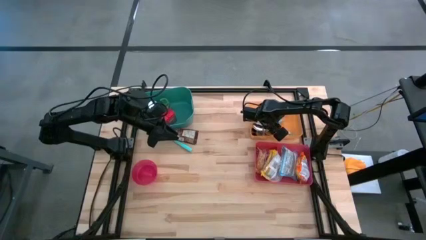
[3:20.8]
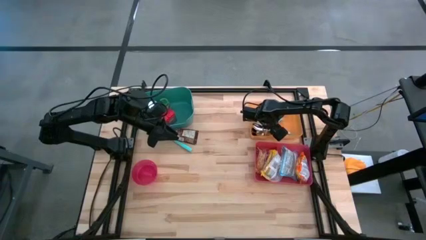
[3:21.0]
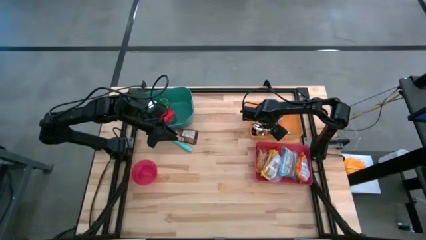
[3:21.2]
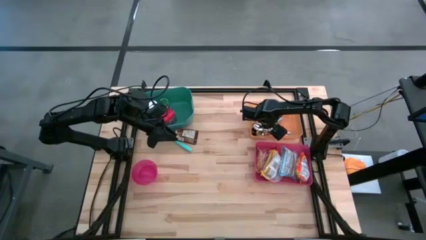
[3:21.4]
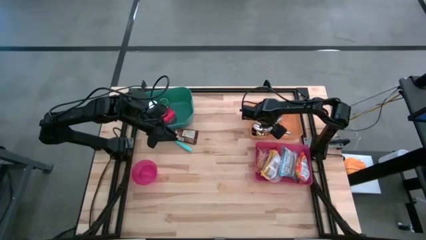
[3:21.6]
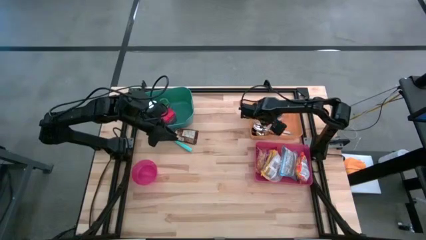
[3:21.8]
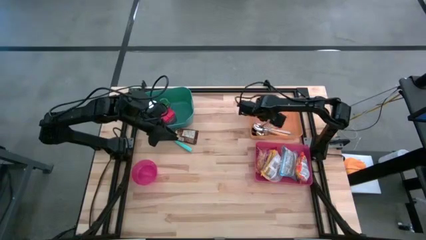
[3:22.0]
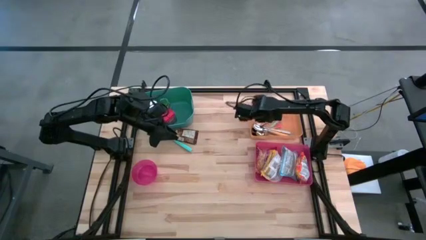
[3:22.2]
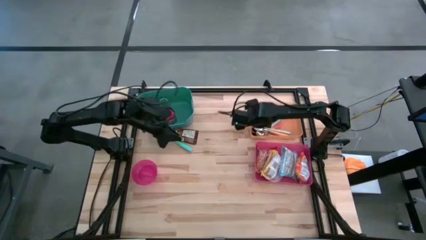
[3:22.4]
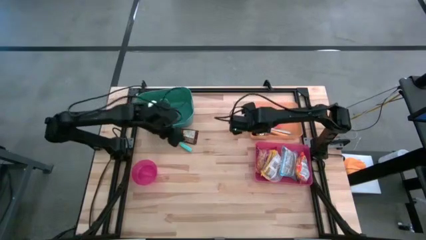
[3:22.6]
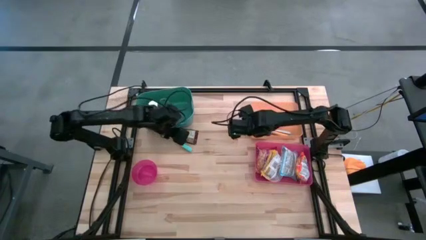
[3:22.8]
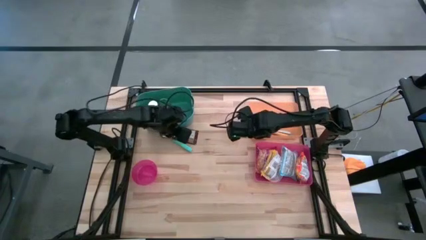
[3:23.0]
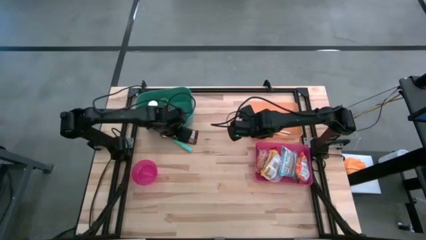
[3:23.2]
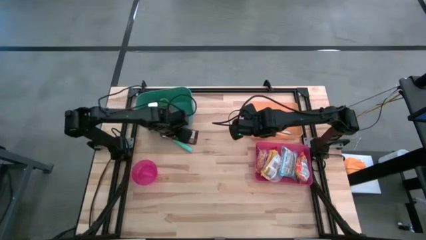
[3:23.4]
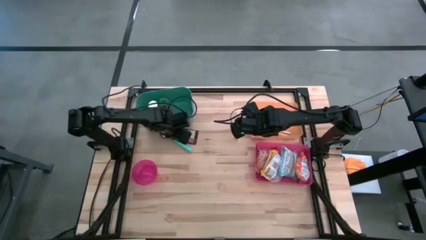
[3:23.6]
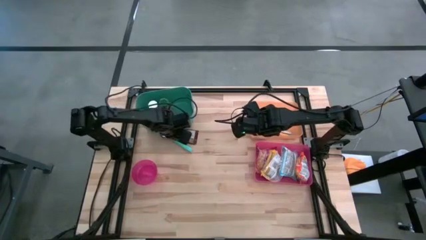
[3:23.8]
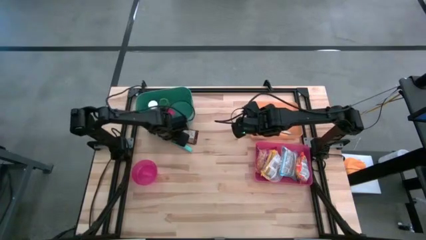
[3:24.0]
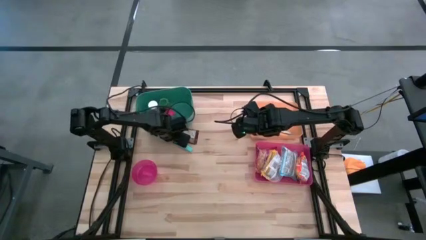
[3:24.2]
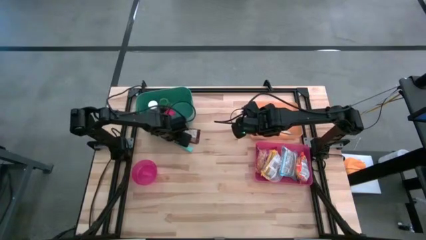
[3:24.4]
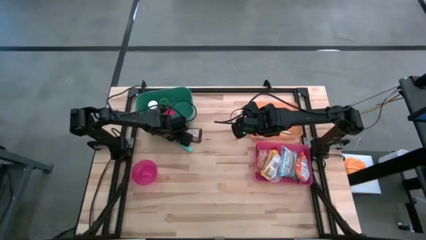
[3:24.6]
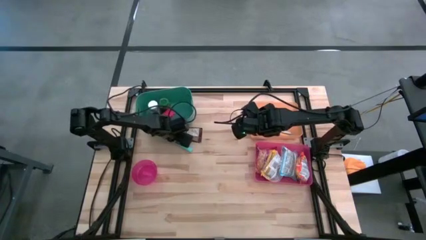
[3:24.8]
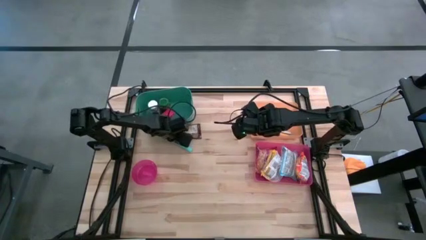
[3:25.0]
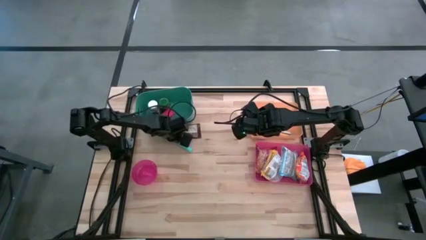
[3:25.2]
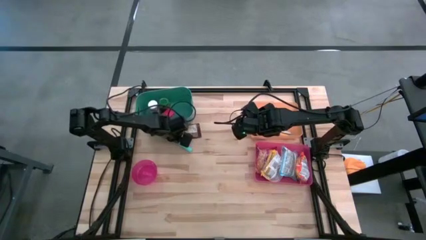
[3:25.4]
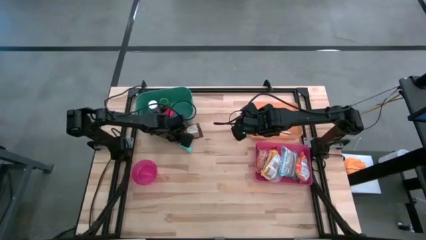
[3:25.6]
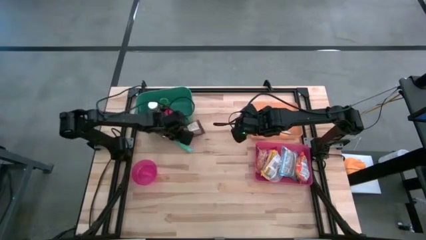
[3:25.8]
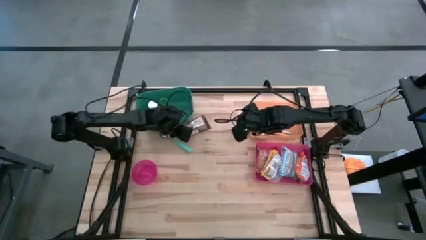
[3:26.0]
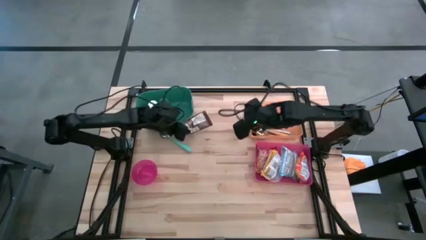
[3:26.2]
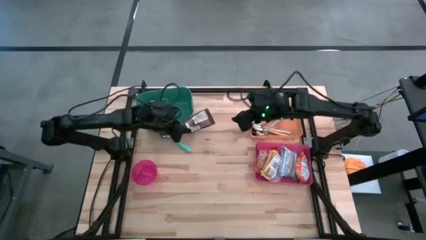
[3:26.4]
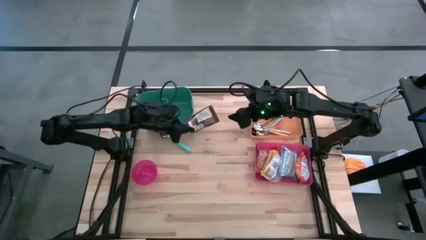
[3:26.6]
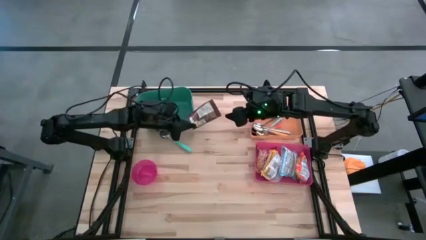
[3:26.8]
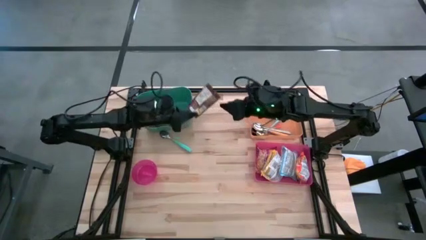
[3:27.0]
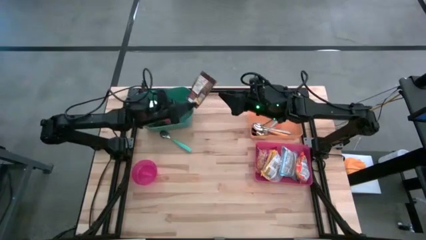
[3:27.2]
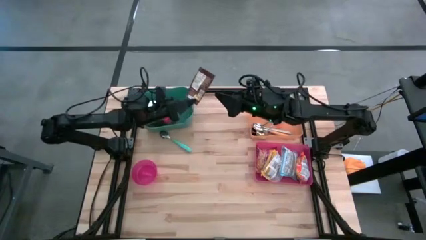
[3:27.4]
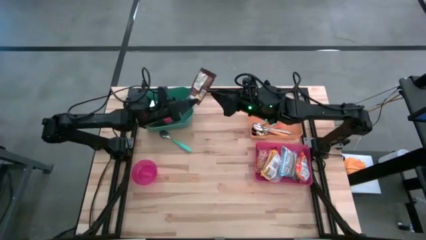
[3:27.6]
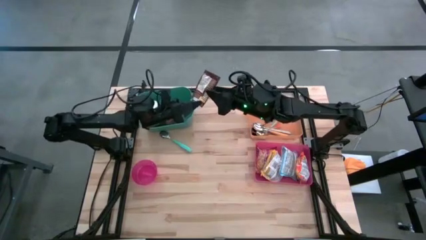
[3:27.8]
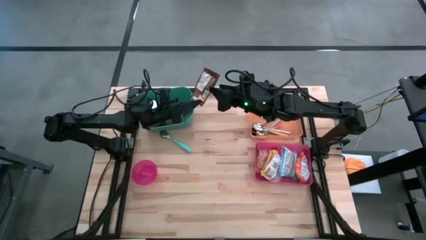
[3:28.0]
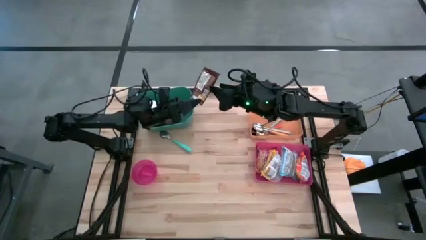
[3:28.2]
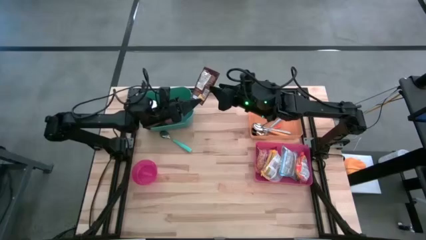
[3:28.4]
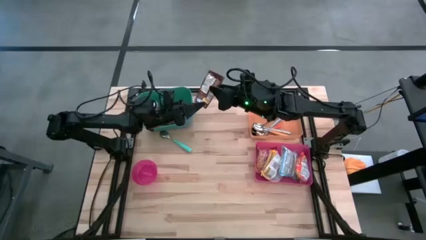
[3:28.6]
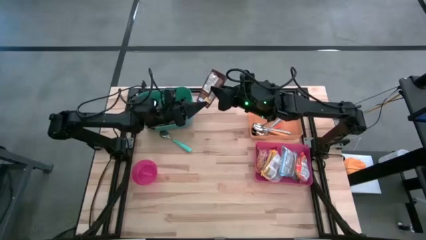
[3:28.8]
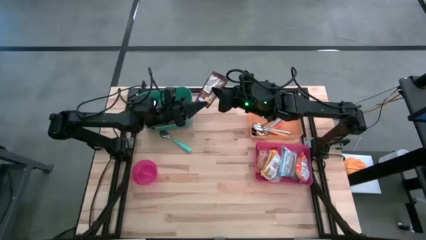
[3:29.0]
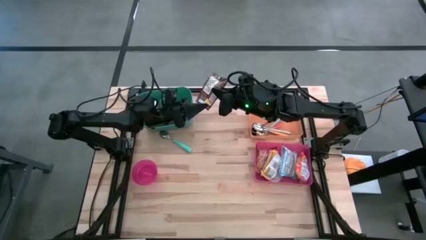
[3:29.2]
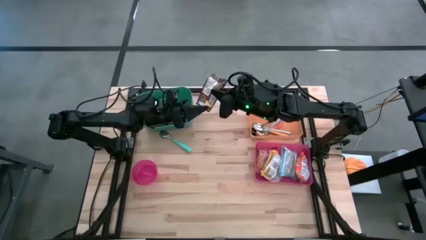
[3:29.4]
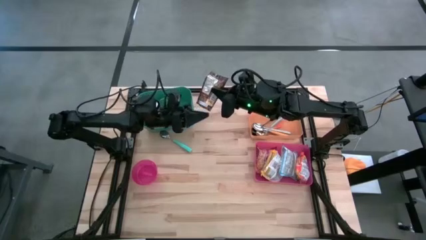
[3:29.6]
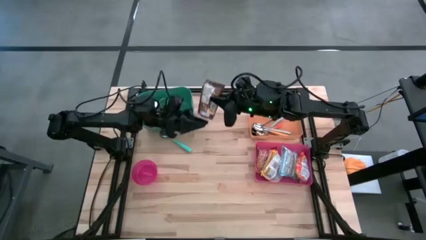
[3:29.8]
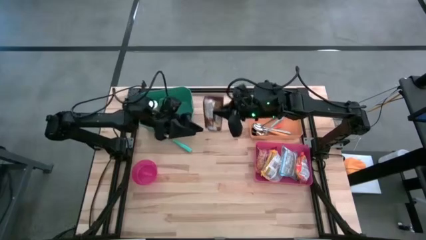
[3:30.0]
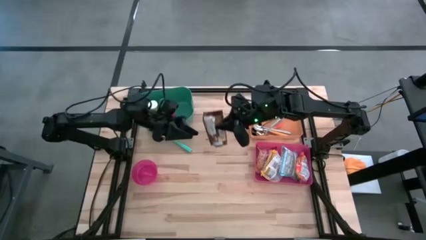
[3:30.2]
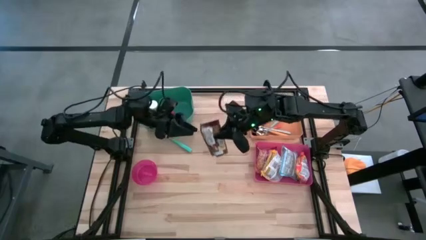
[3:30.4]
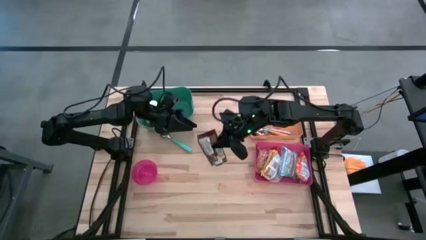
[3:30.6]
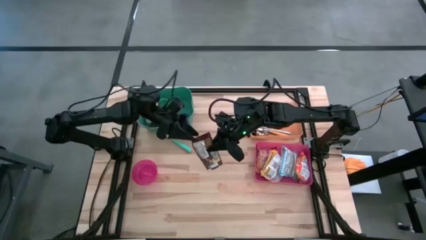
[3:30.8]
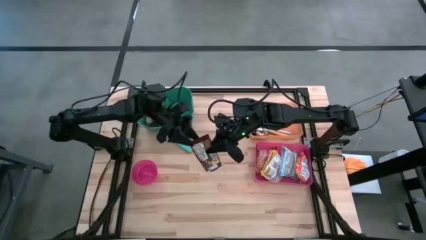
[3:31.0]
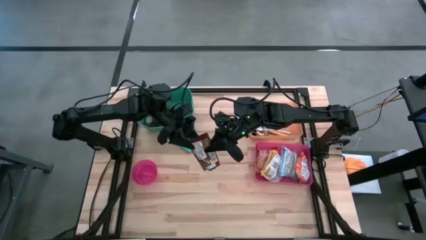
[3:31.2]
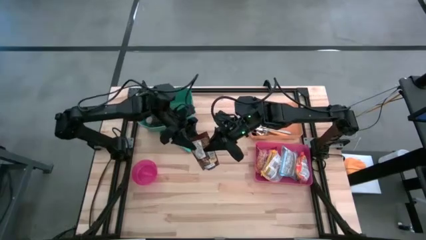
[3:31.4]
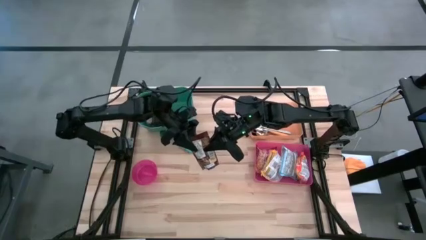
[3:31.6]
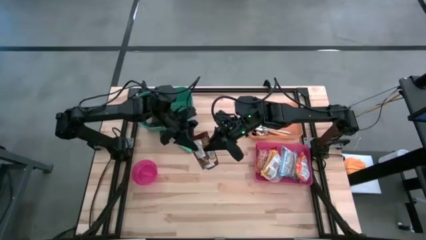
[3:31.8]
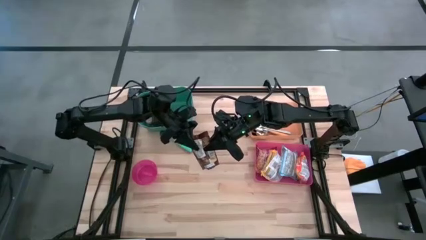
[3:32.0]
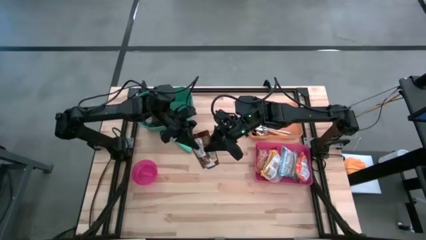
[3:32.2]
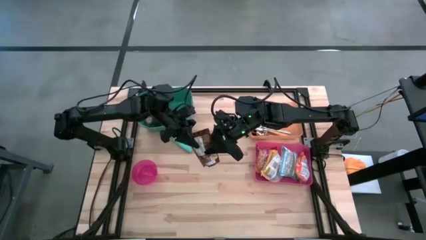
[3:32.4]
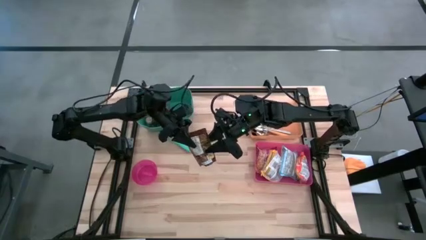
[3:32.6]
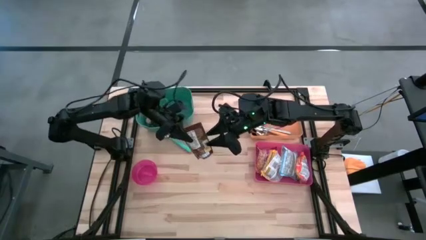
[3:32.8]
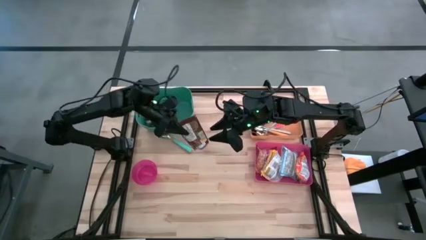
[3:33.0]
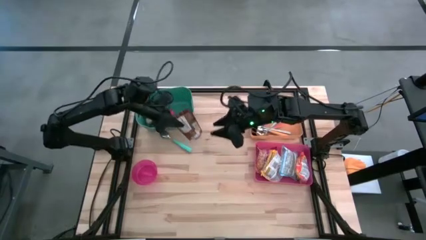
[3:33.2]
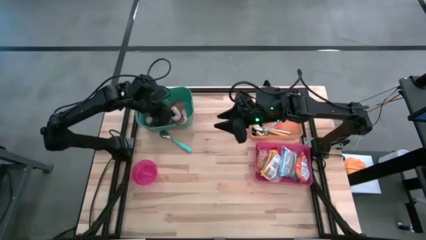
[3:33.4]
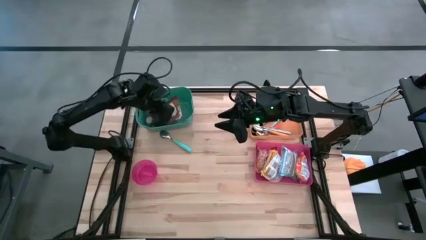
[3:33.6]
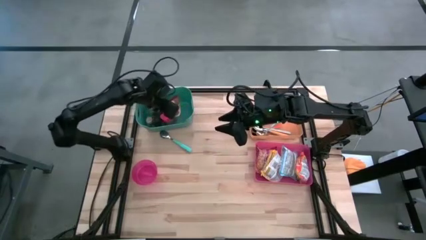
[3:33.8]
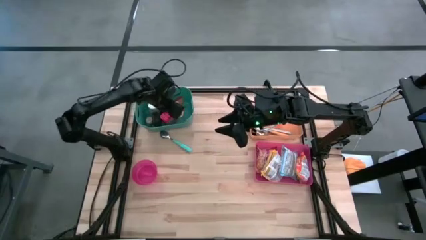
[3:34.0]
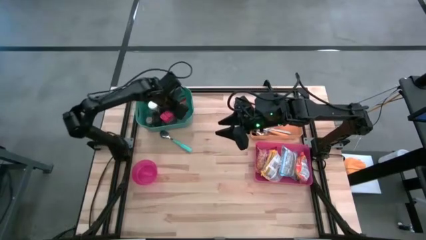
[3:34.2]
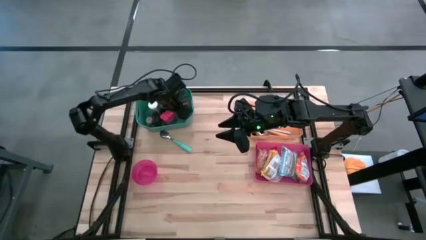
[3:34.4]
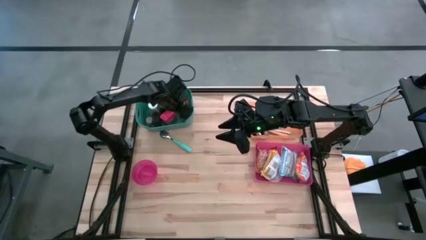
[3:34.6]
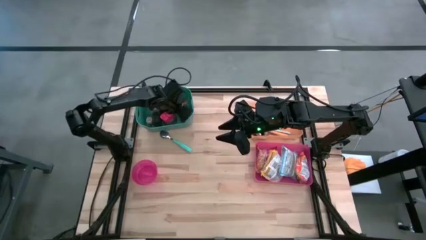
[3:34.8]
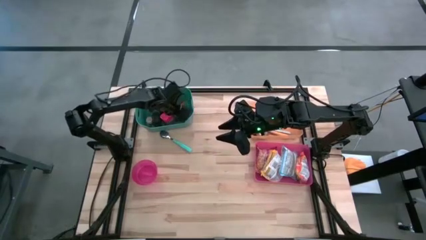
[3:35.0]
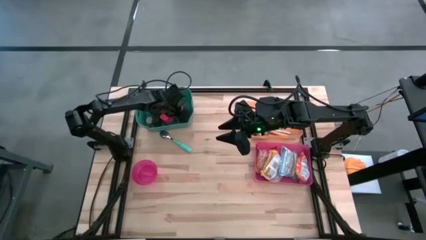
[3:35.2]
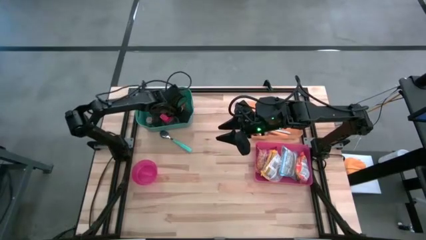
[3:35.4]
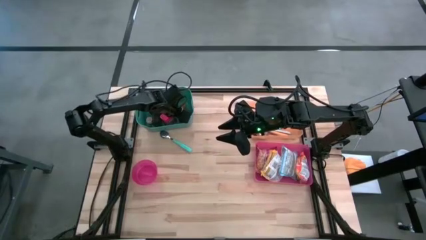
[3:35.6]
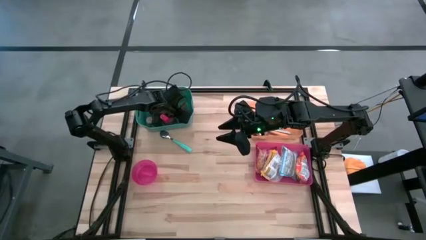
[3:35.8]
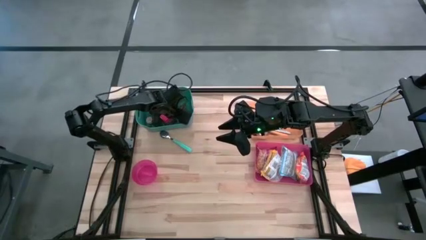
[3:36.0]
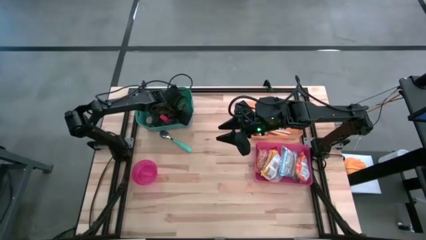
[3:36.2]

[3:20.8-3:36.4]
Put the orange seasoning spice bag into the green bin
